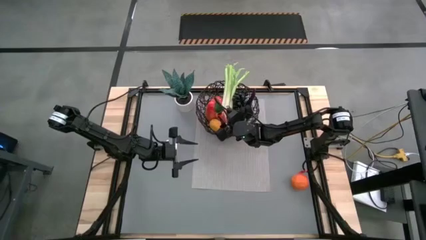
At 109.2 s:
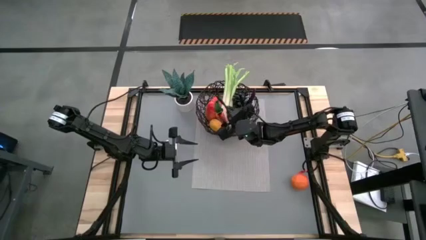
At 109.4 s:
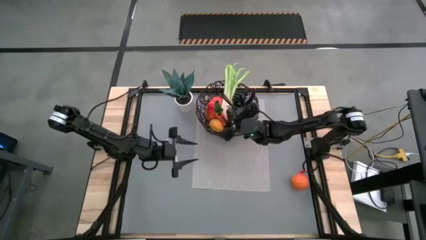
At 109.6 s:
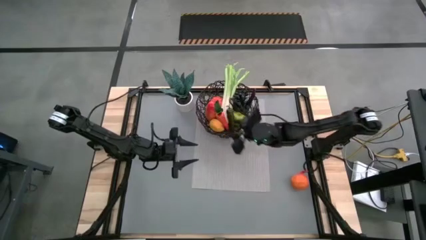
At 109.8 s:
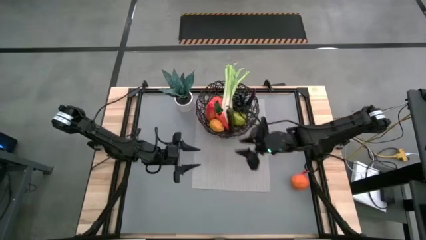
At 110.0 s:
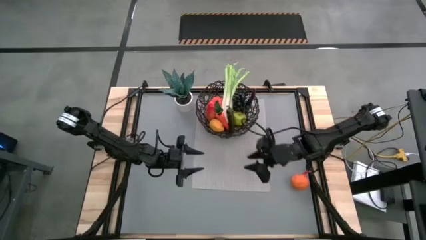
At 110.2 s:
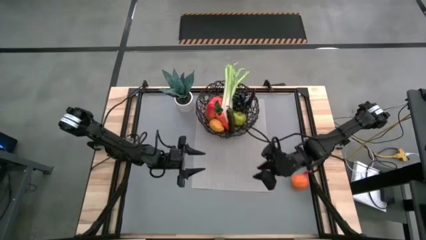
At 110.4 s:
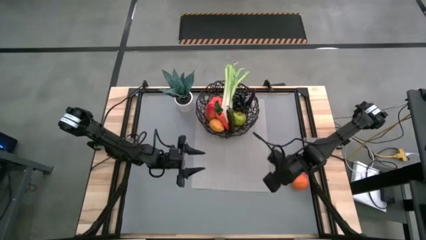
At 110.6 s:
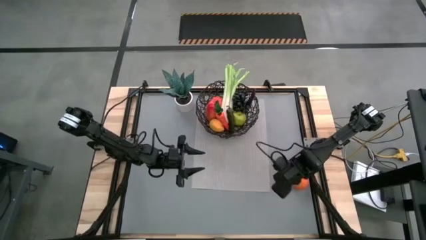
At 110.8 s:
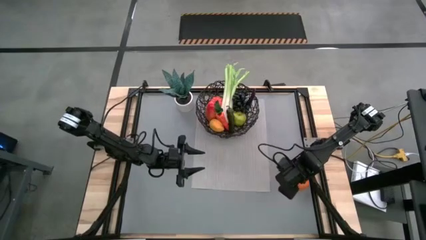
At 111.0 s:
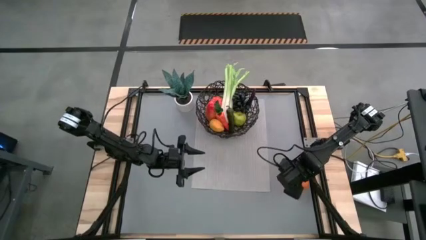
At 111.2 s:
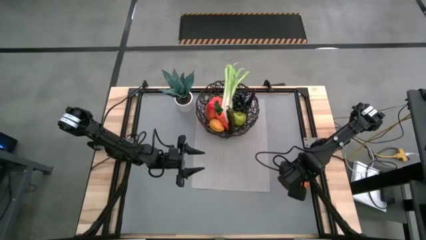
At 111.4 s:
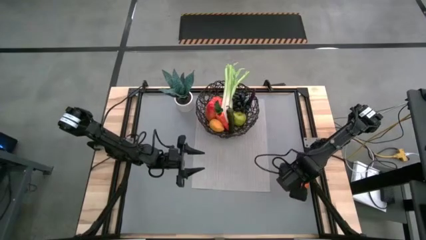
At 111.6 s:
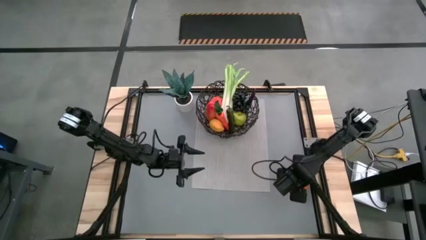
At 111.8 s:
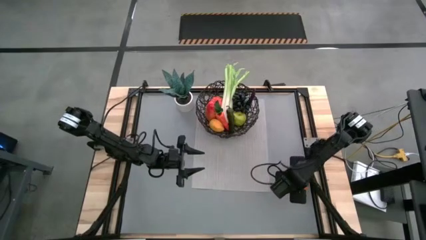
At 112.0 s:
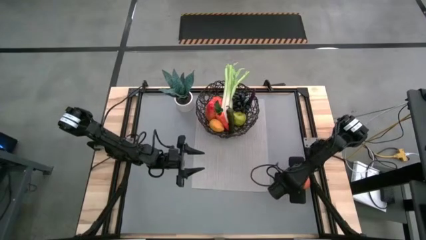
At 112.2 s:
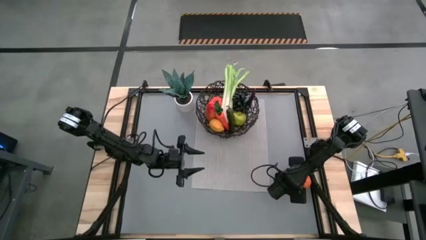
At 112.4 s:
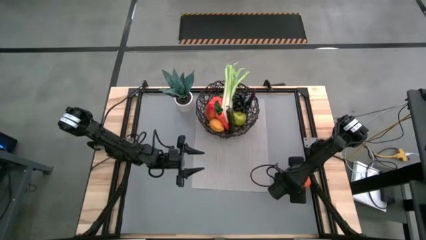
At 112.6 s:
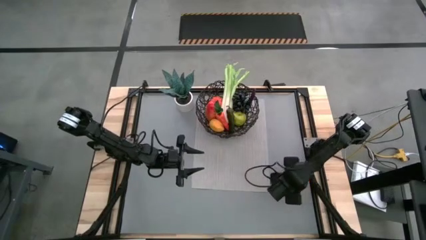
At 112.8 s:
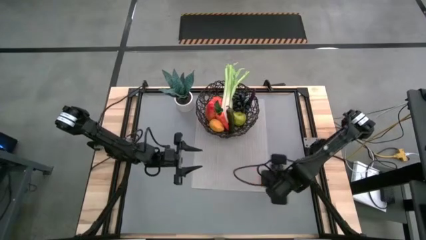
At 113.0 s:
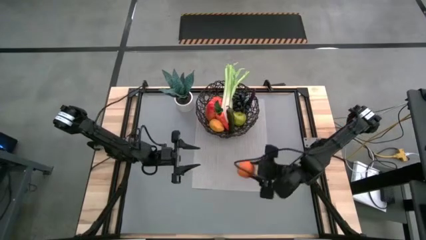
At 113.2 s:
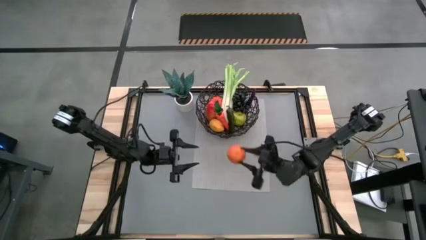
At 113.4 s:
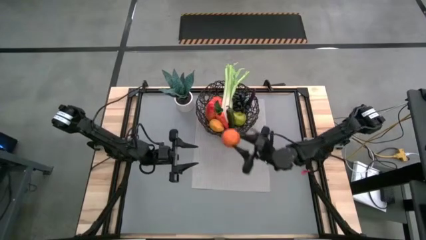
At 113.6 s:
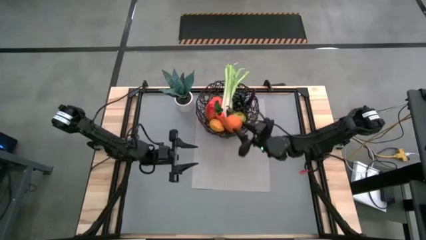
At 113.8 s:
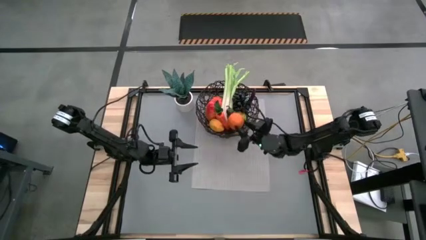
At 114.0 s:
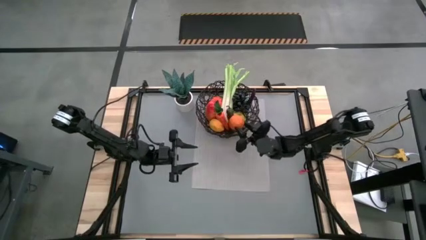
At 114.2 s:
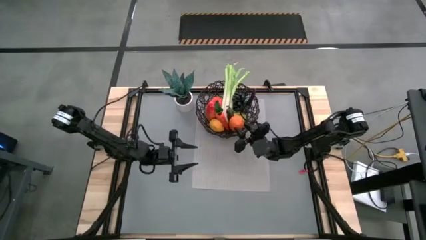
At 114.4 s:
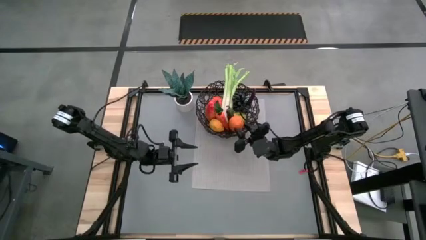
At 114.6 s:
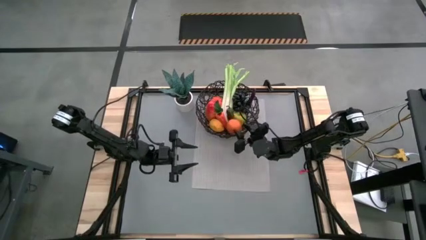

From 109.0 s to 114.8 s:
Task: Build produce basket
Put the orange into the black wire basket

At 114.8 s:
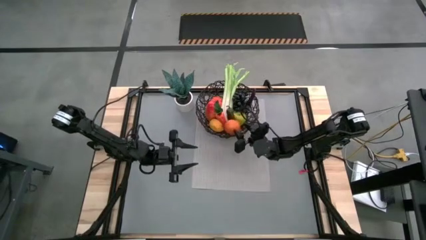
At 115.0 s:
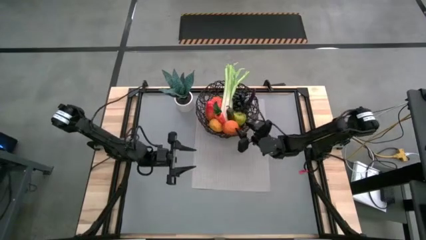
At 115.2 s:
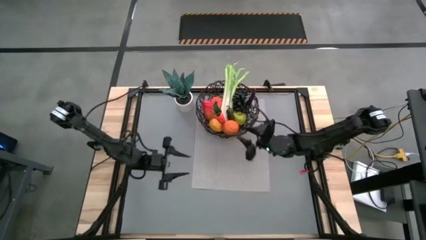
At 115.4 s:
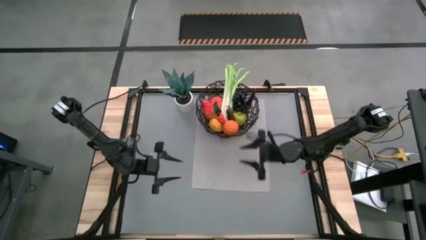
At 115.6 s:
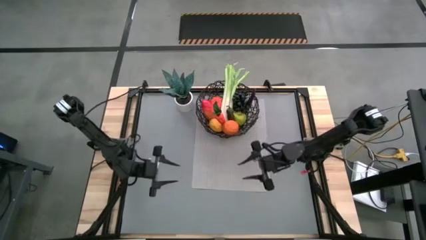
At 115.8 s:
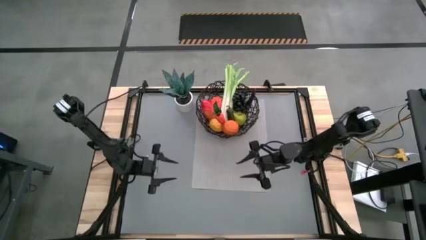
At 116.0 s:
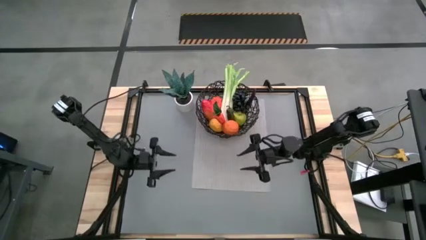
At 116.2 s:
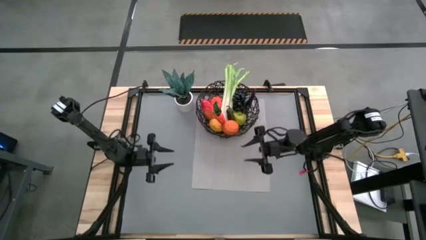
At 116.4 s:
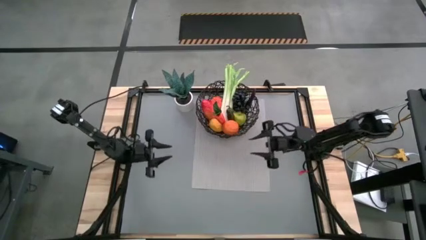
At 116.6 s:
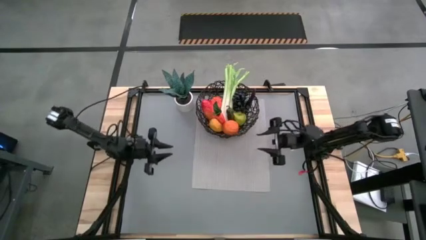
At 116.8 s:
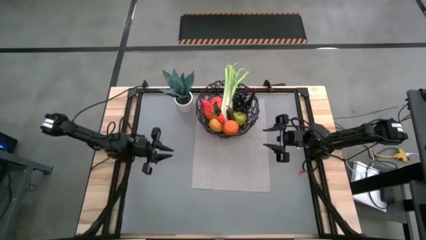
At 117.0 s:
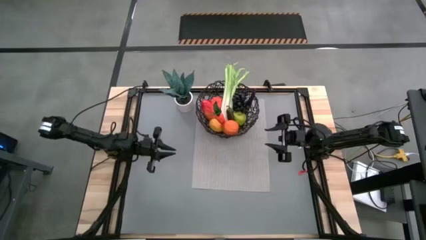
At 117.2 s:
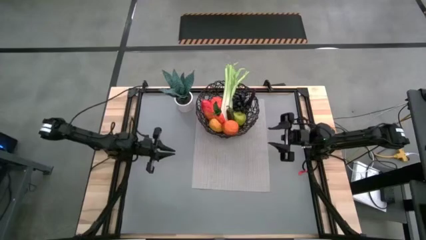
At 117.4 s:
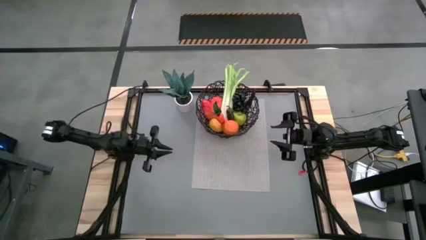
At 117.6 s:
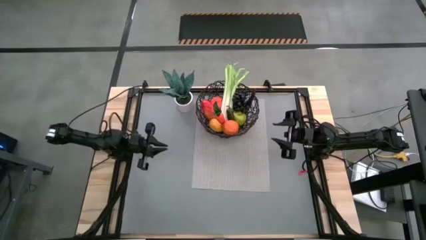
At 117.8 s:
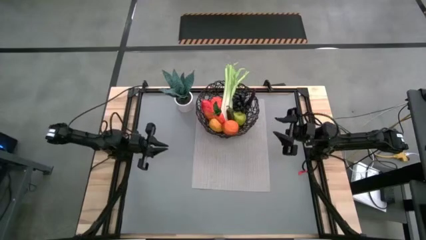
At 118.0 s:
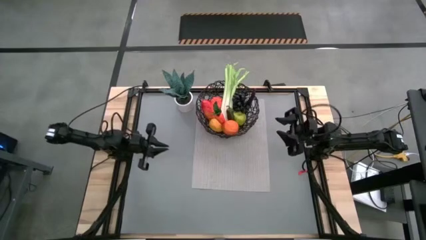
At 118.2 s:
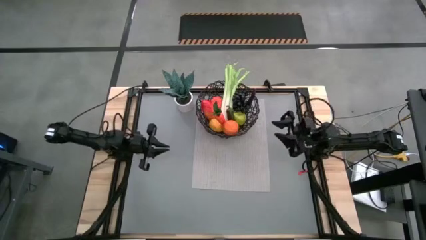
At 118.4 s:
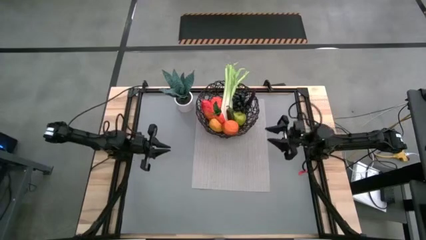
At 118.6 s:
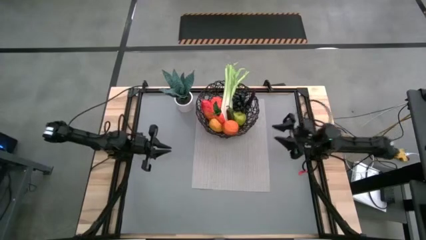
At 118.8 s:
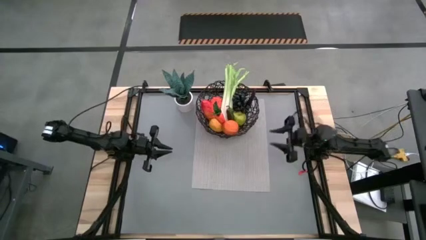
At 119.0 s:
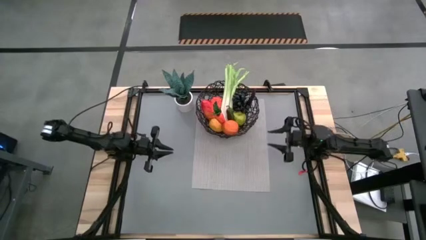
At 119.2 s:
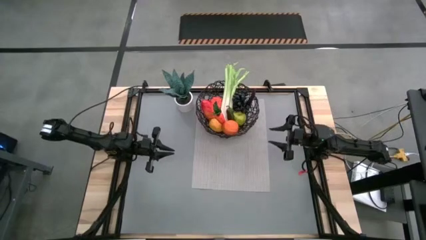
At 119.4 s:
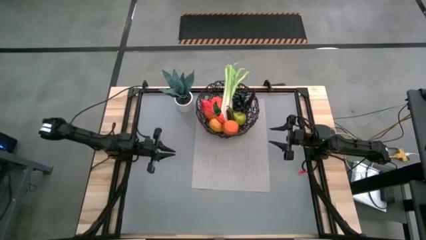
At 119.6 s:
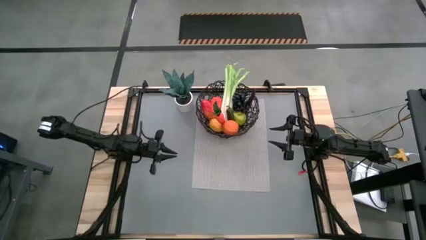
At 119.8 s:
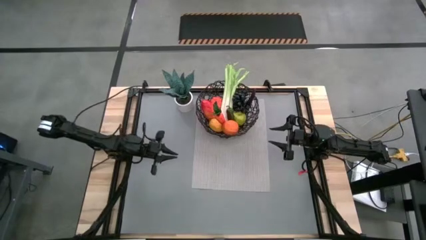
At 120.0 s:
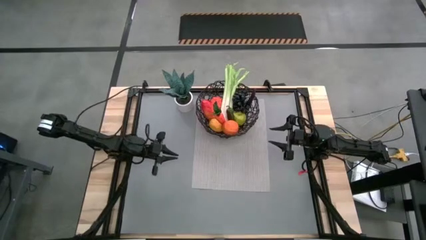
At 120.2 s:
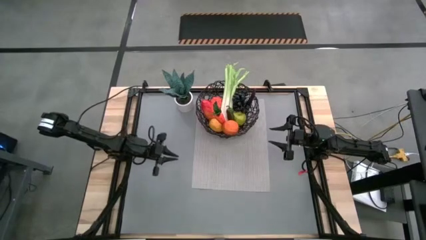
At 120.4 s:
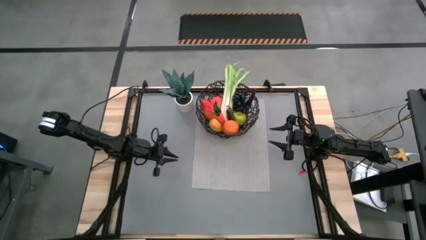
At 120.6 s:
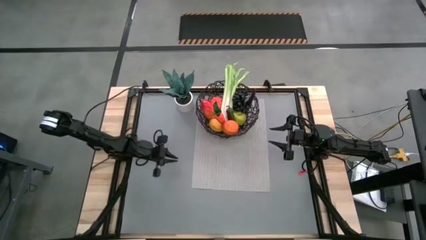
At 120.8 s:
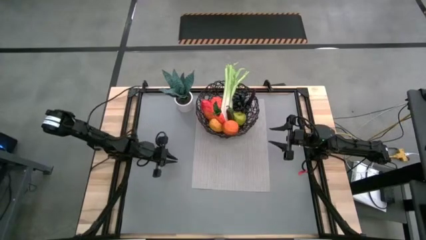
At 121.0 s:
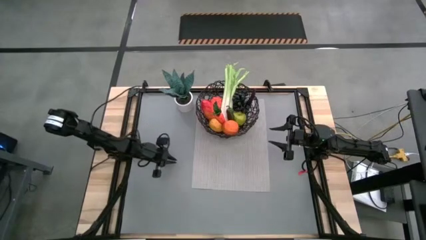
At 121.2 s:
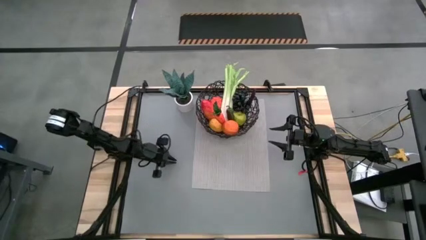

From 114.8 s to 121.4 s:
Return to Home Position

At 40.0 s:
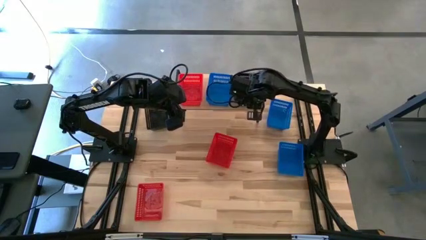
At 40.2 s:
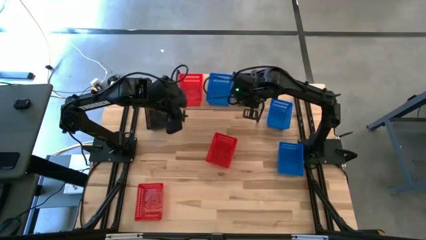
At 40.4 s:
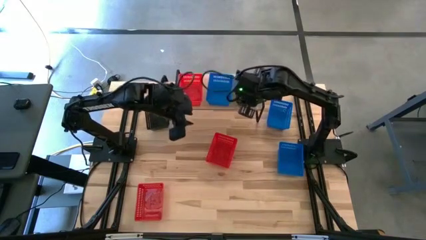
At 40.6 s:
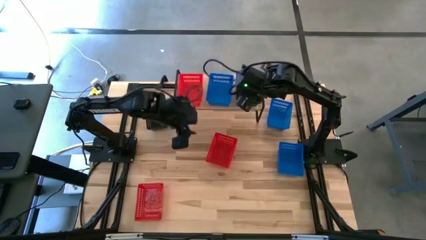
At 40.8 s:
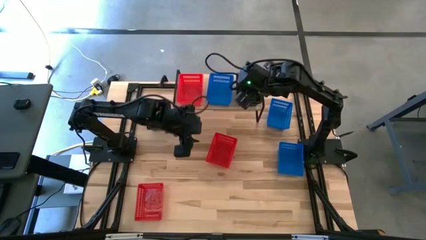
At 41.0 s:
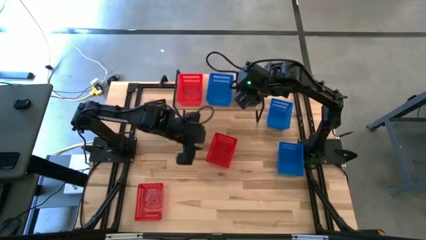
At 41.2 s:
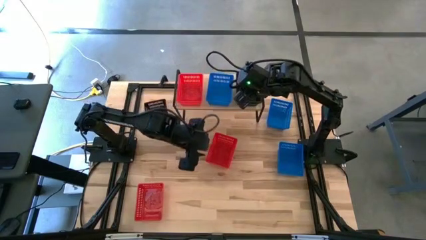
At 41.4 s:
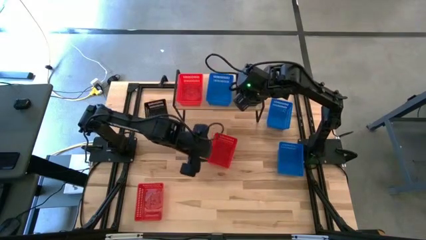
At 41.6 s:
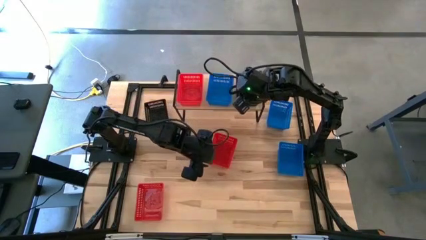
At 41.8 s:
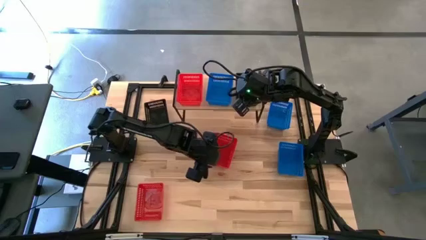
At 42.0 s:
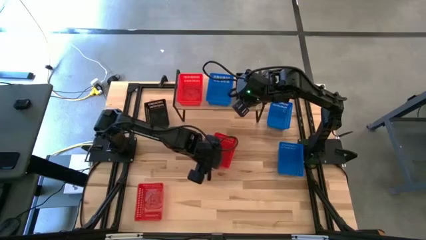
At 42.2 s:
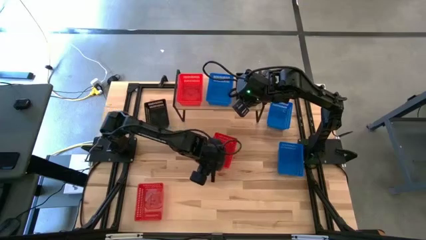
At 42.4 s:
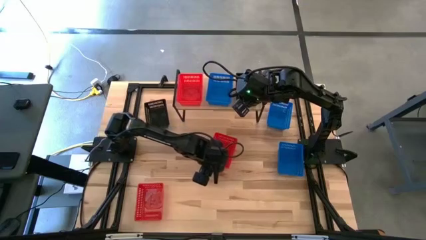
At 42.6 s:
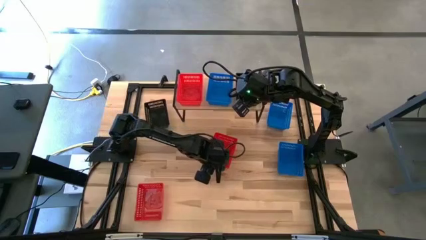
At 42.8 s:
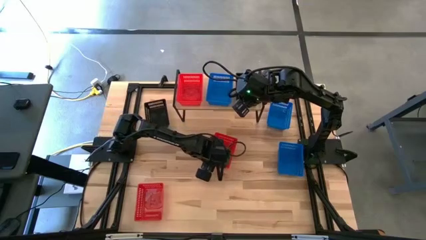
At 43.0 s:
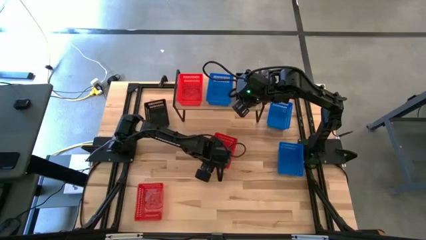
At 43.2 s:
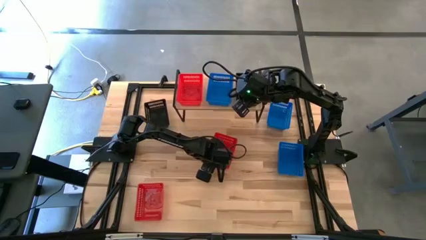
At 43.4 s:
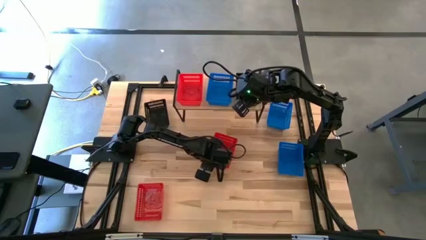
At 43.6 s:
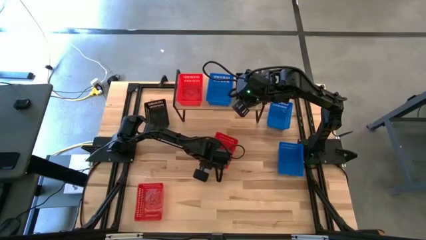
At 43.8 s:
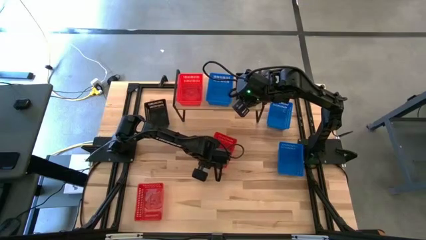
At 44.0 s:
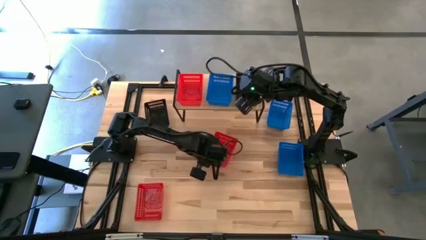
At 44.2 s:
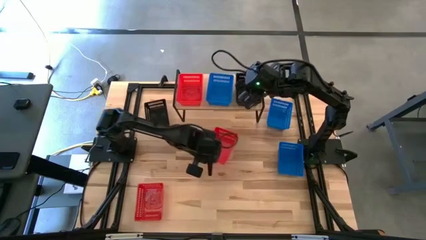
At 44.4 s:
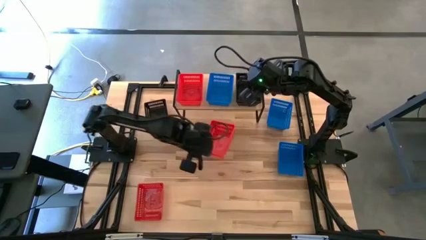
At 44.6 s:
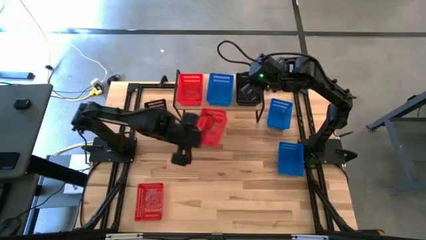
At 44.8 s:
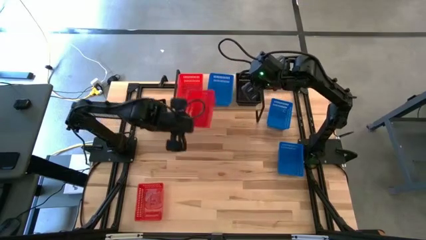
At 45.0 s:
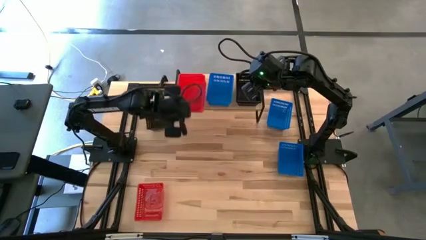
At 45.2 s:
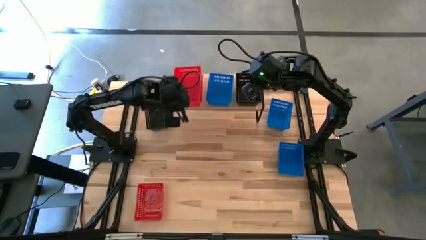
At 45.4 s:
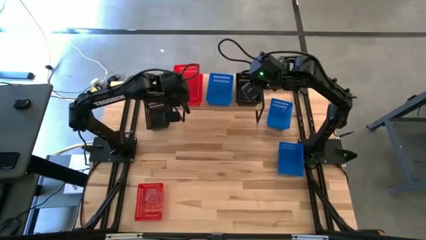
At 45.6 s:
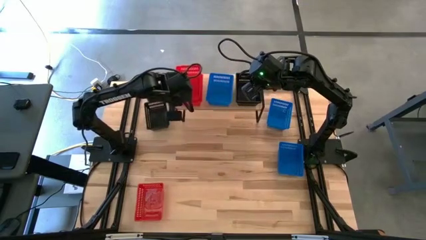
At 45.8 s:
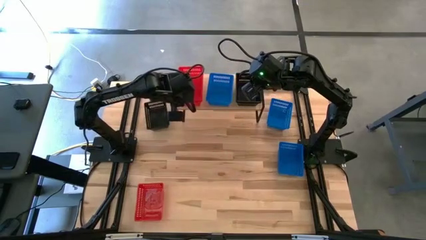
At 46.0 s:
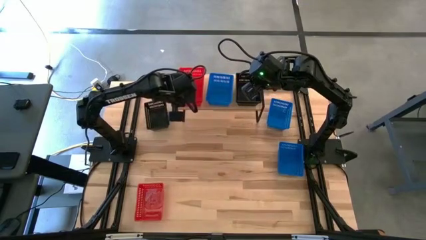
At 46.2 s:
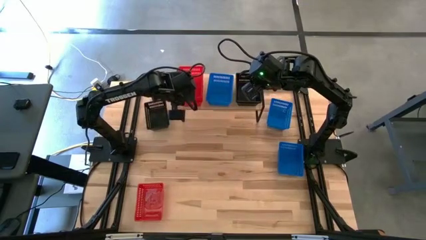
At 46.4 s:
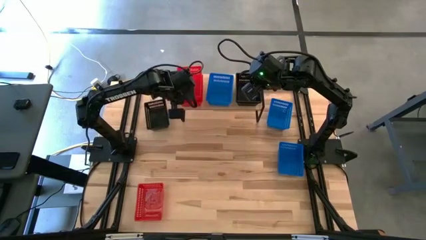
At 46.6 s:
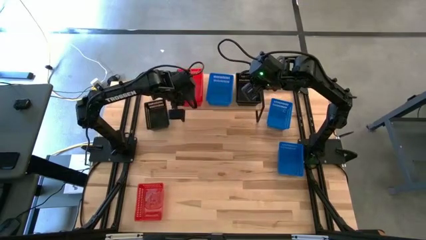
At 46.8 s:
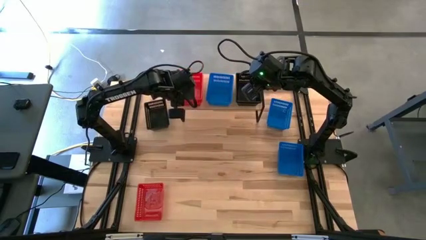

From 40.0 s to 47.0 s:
Task: Stack baskets on shelf by color
Stack the top red basket on top of the red basket on the shelf
